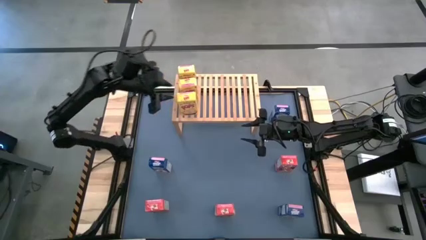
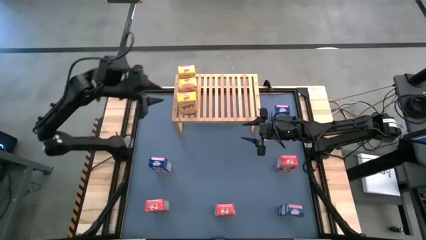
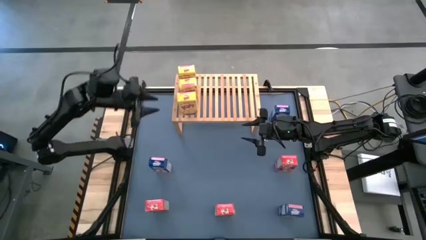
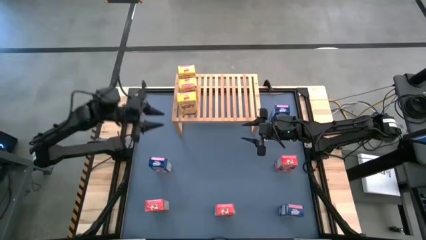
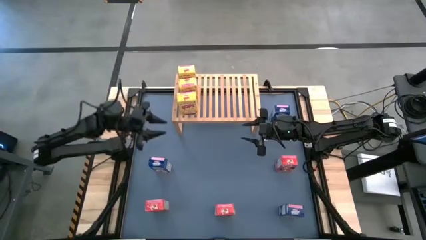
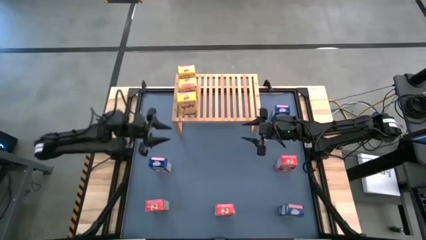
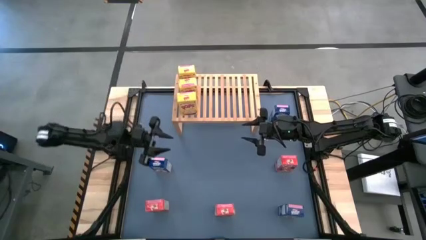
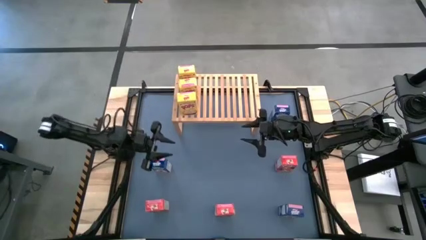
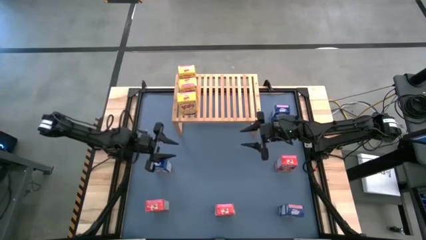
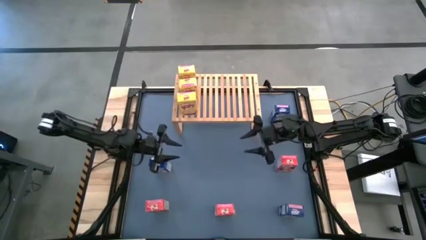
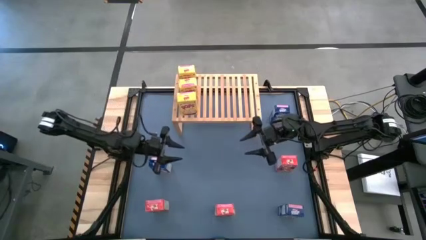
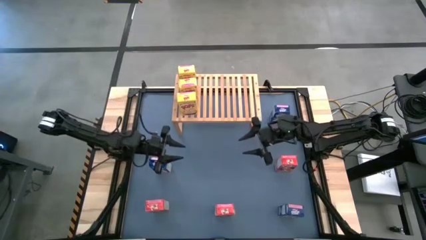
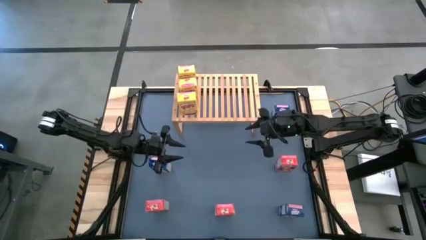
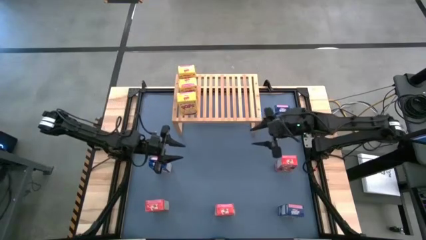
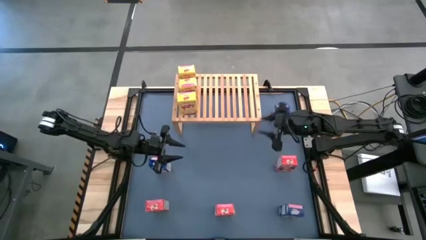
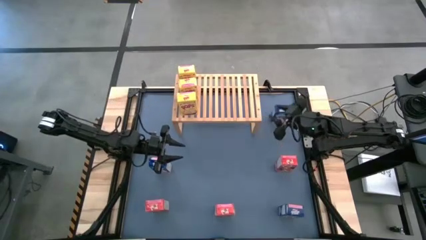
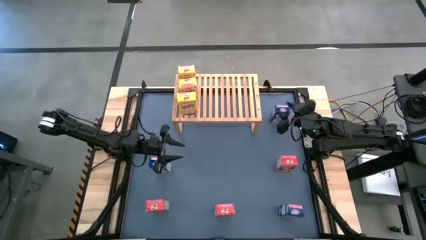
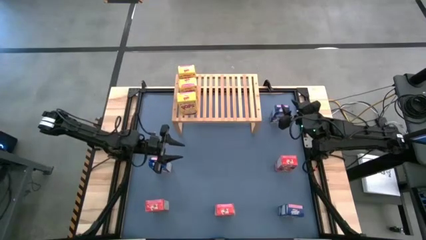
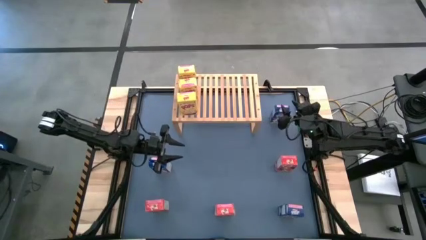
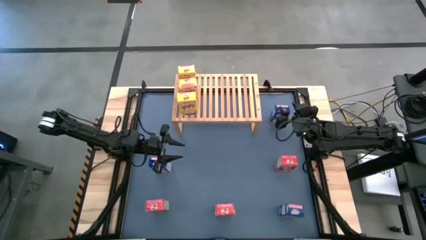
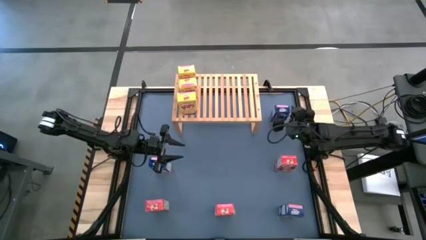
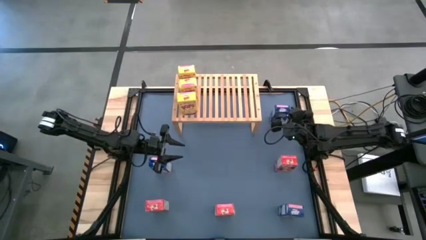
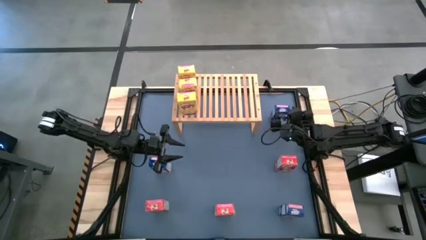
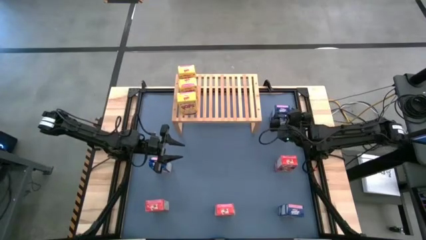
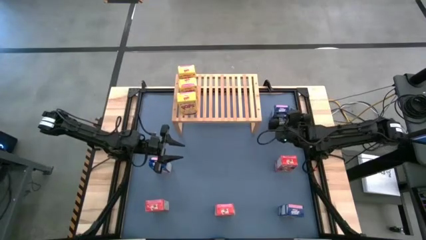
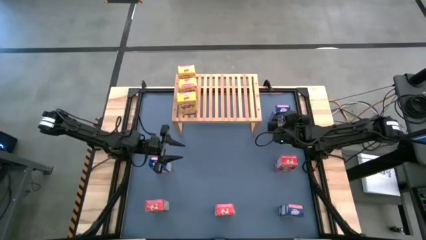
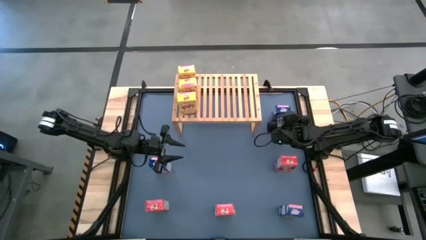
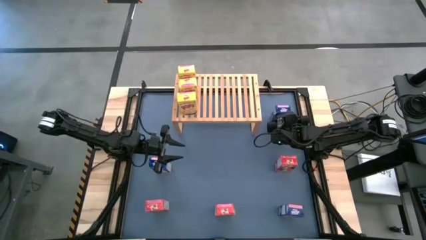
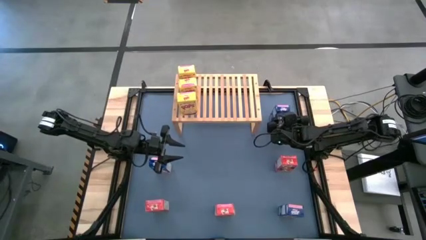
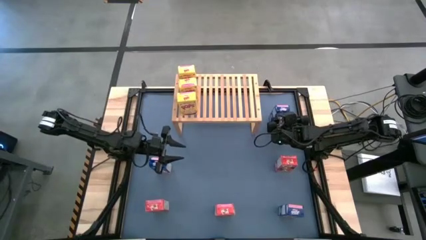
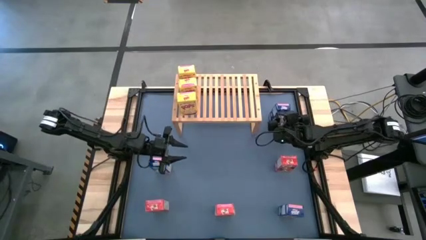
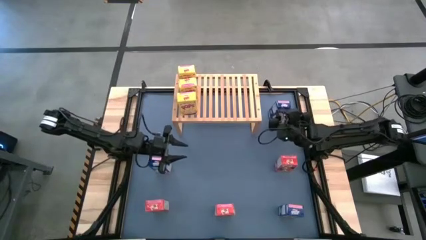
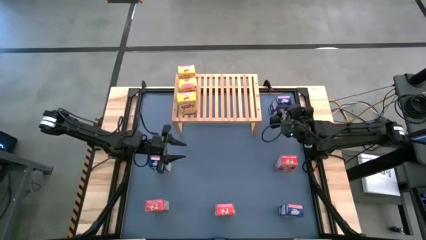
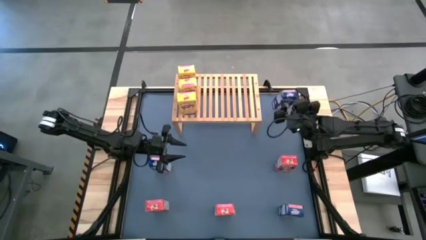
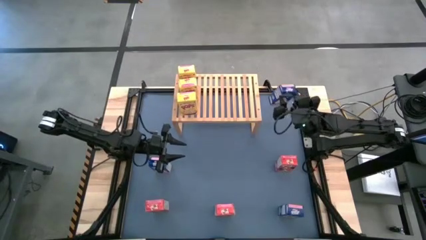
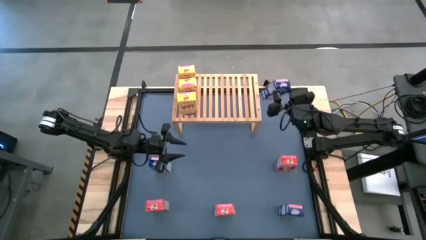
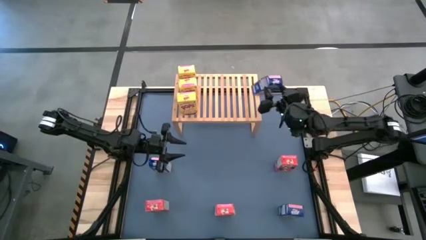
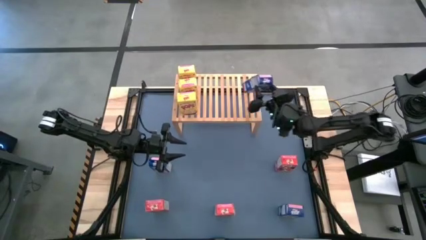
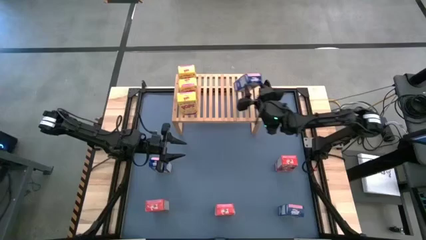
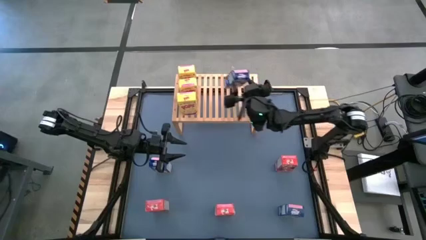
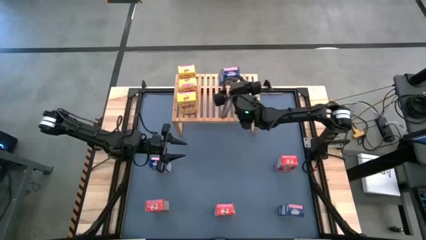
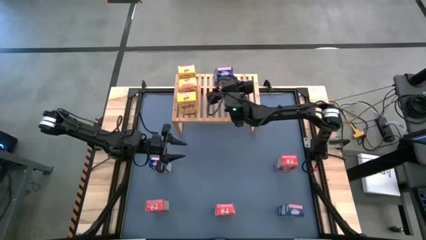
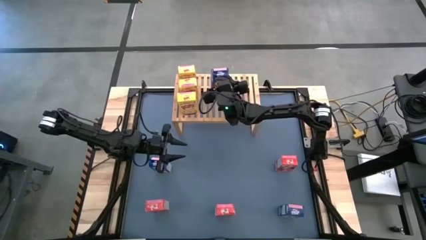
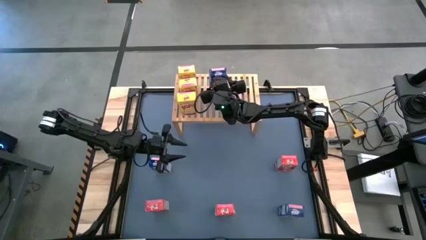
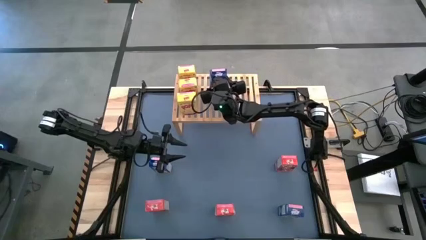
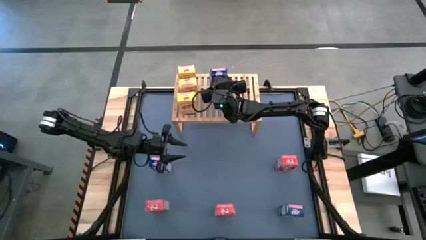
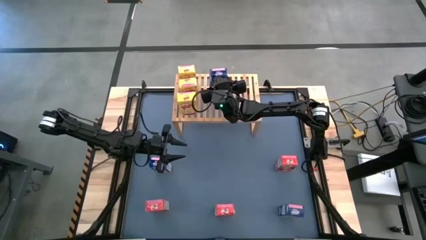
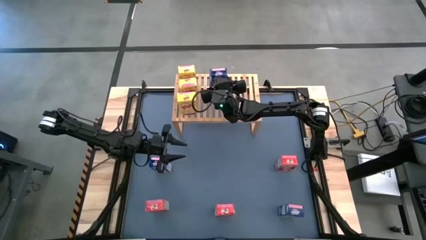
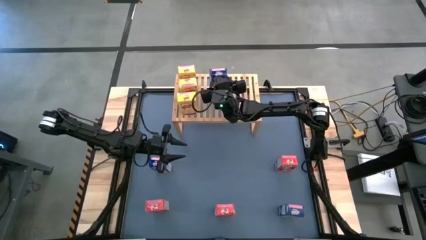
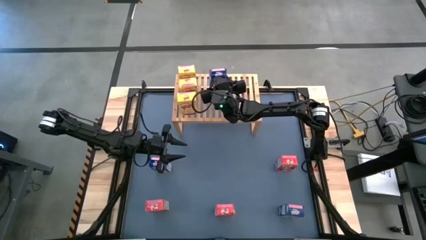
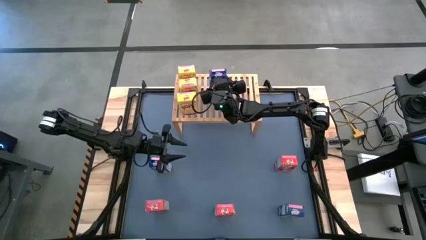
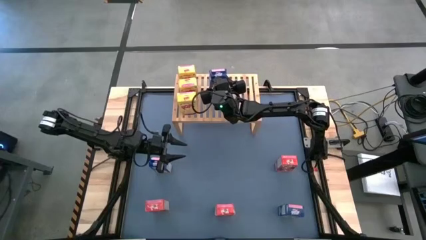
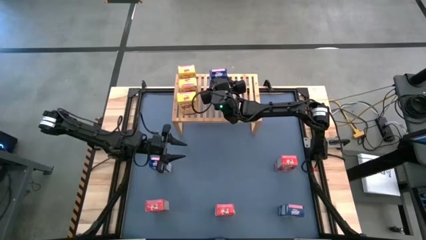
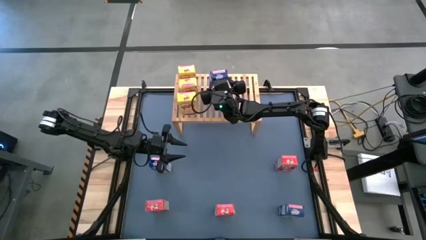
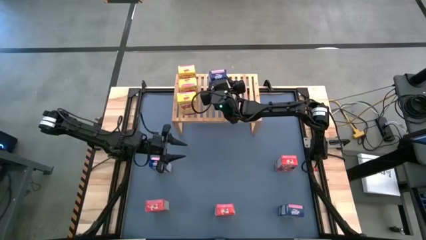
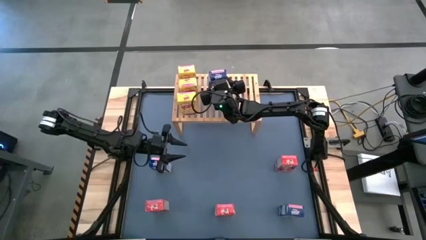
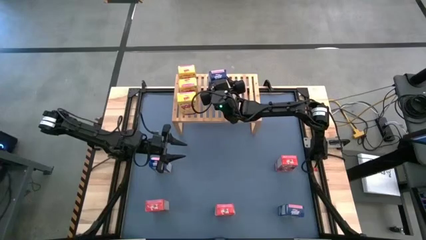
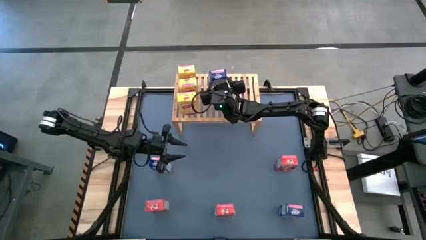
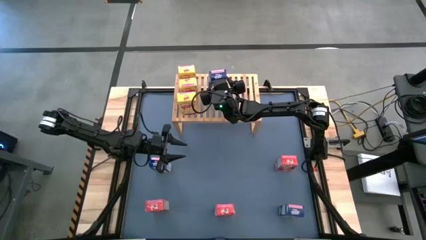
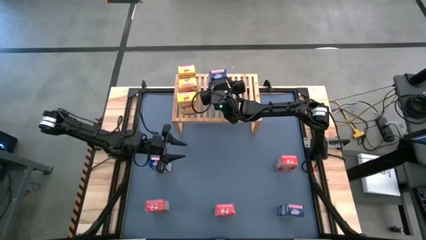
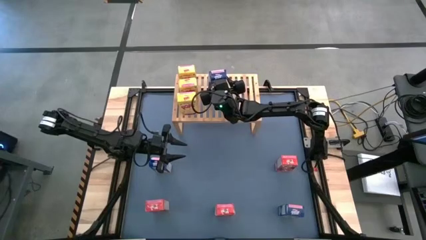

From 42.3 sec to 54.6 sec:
Task: Stack cereal on shelf
Put the top right blue cereal box on the shelf

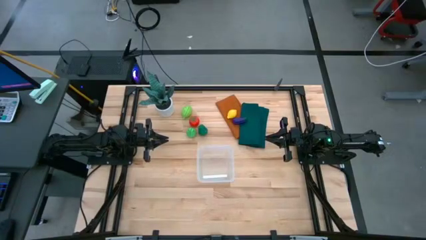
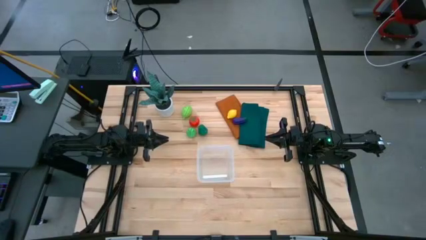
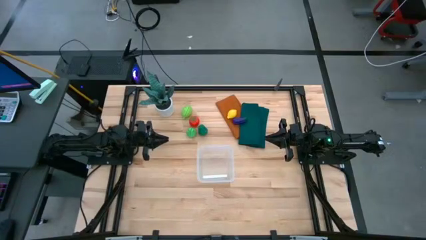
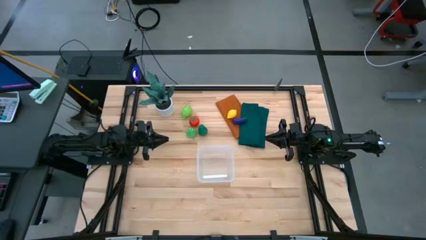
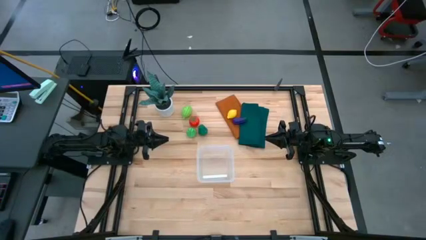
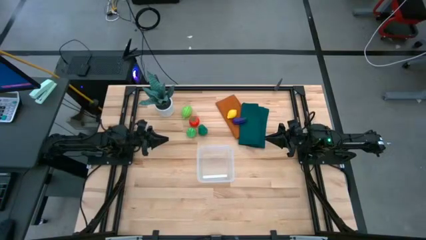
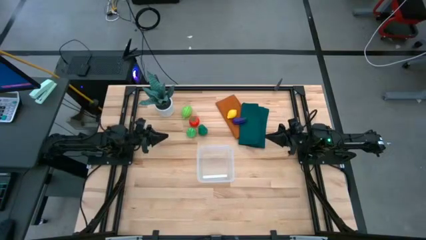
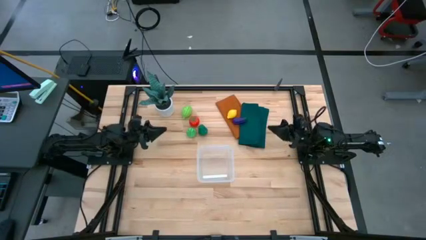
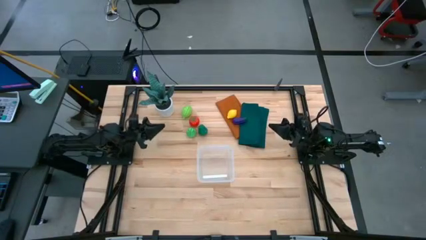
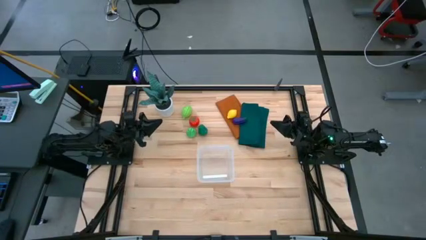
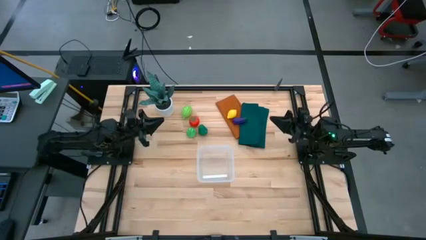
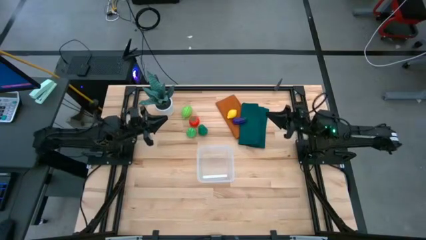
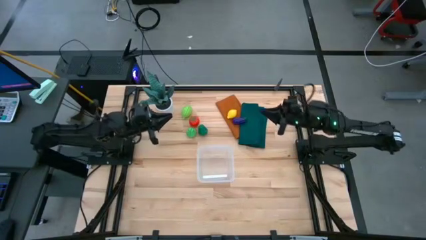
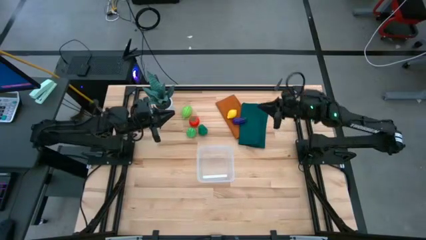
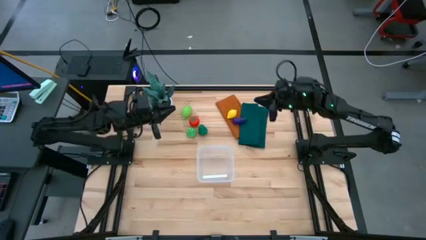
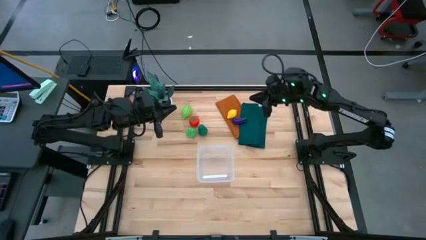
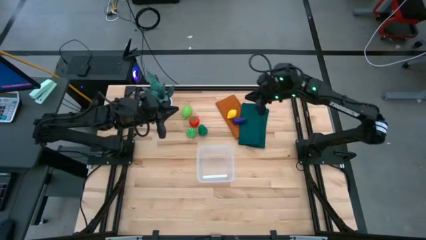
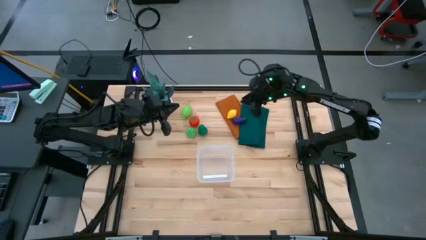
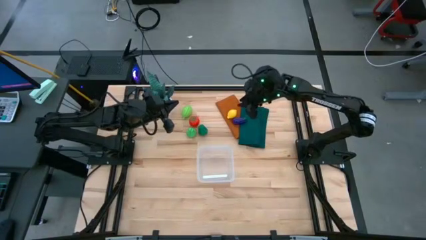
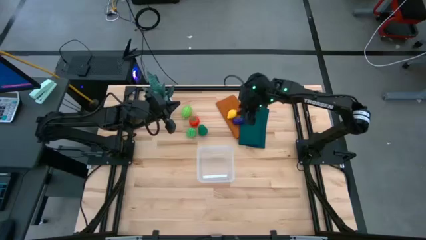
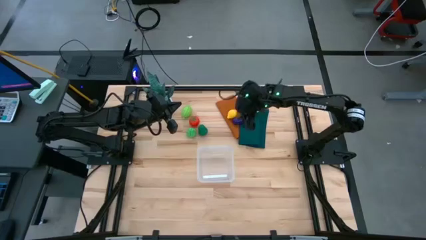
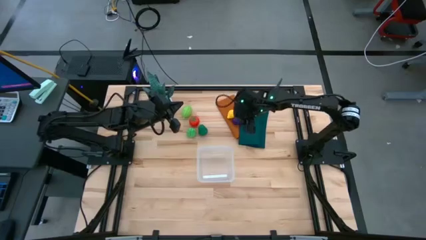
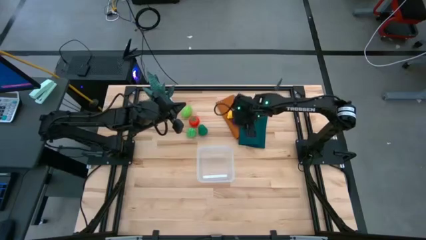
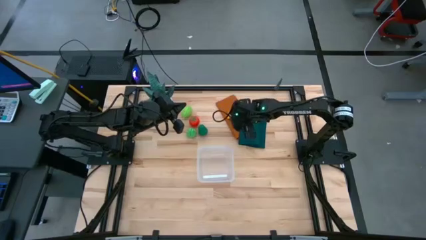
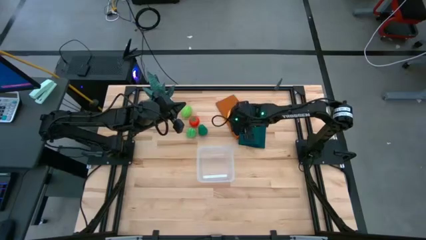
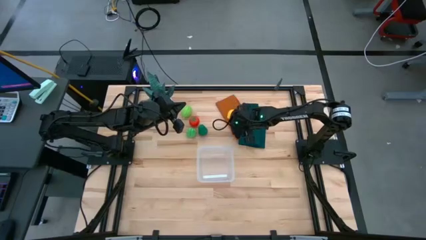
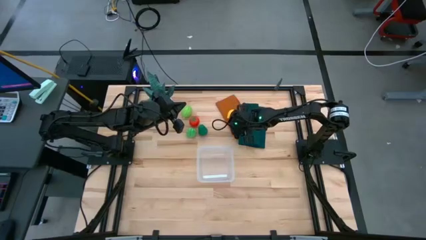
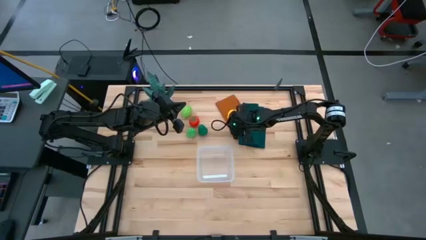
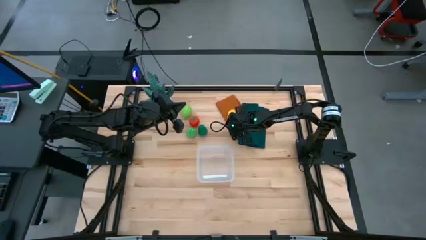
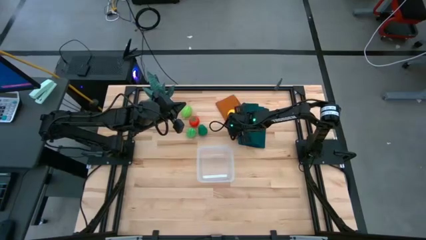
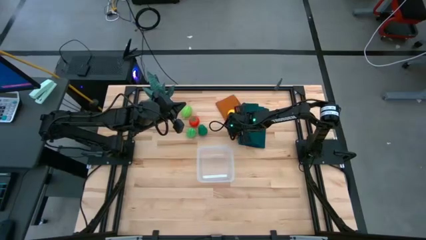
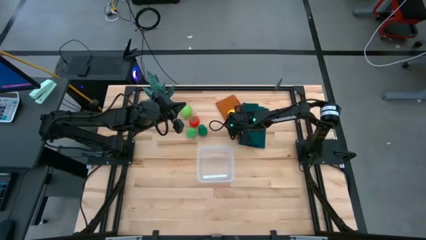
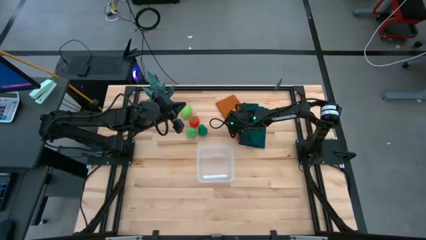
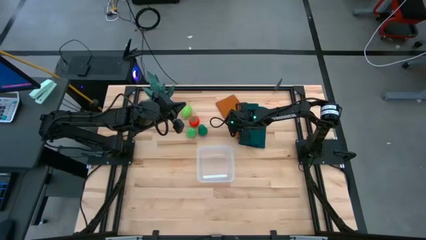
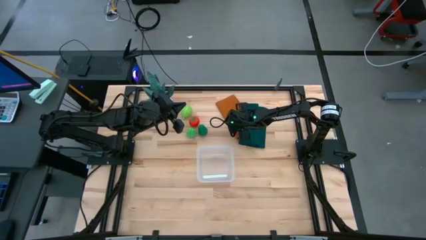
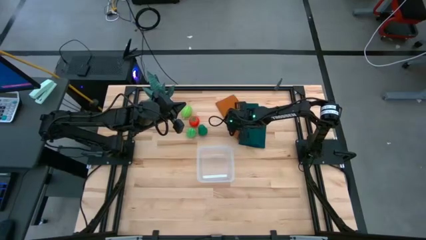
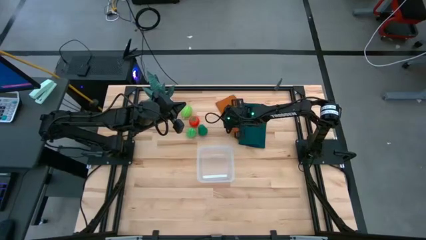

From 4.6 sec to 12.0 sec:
Task: Pick and placing Produce into tupperware
Put the violet eggplant into the transparent container
